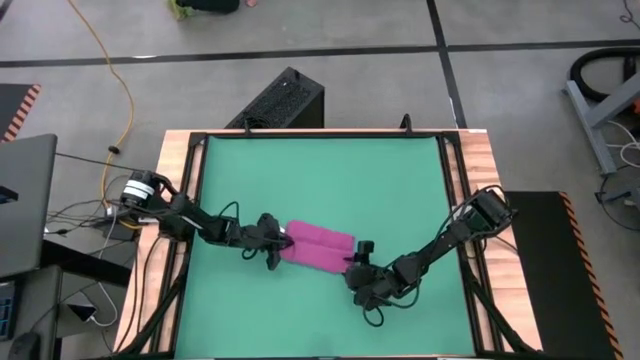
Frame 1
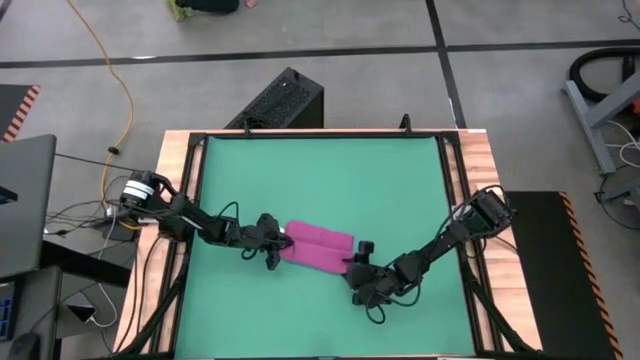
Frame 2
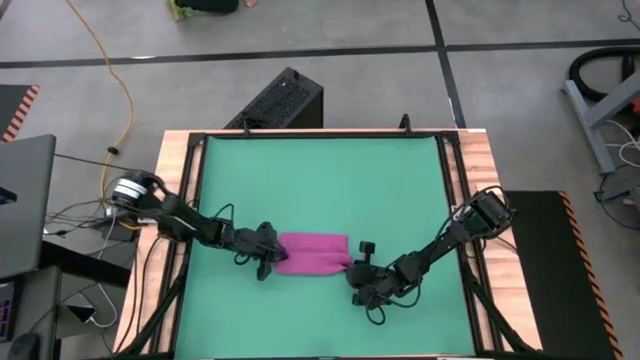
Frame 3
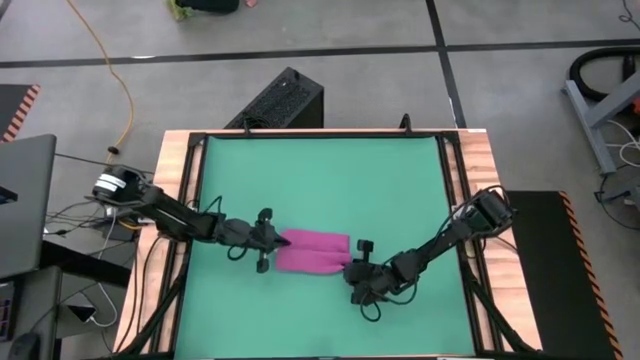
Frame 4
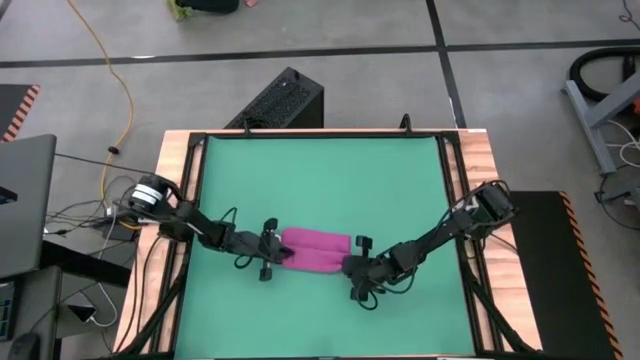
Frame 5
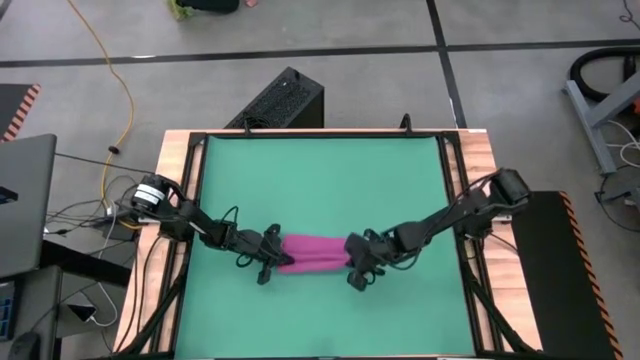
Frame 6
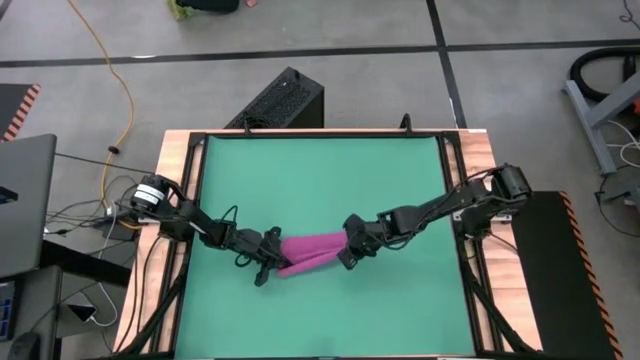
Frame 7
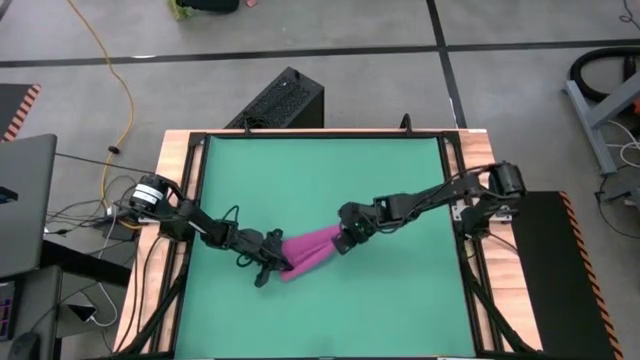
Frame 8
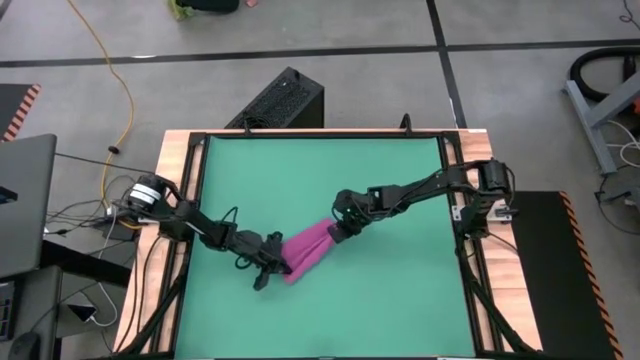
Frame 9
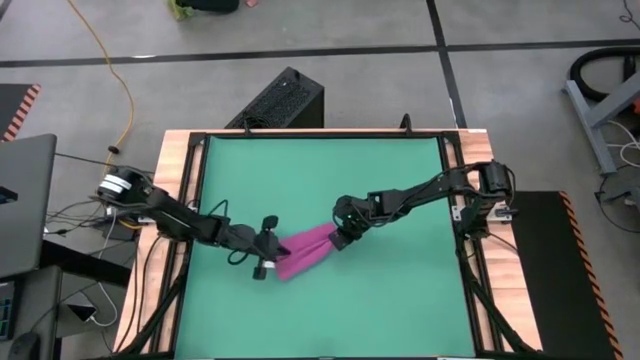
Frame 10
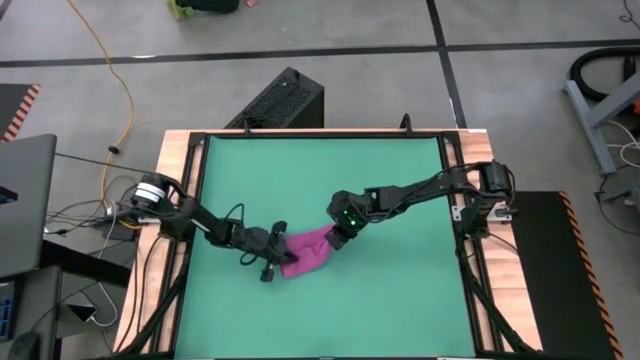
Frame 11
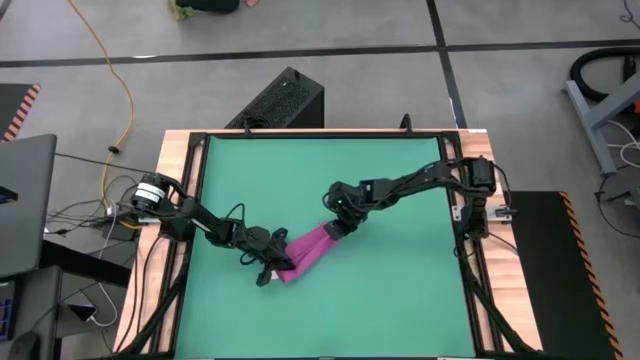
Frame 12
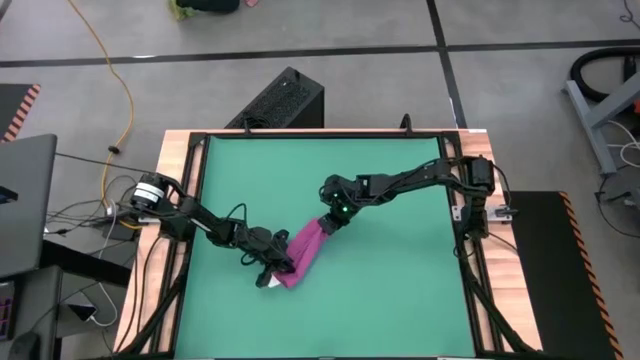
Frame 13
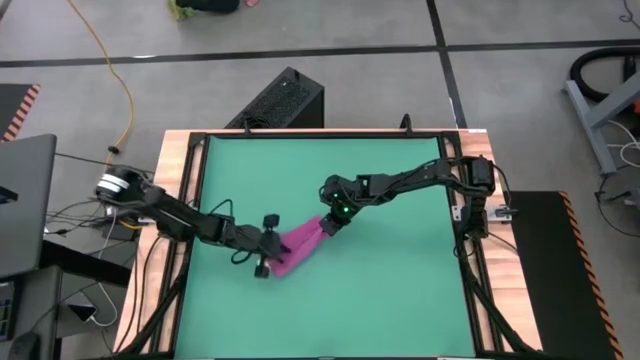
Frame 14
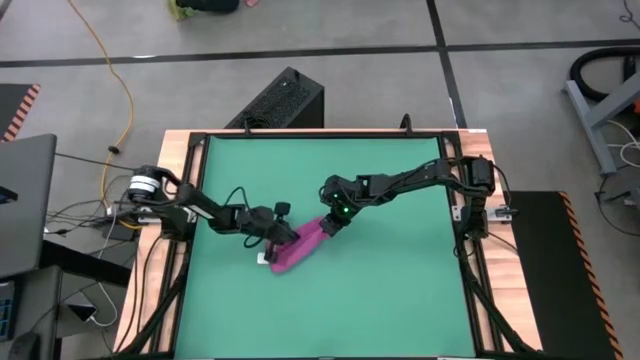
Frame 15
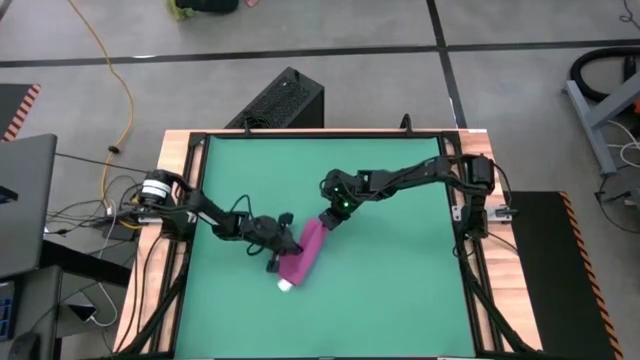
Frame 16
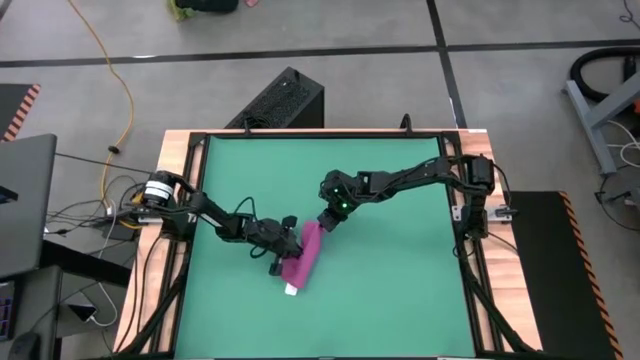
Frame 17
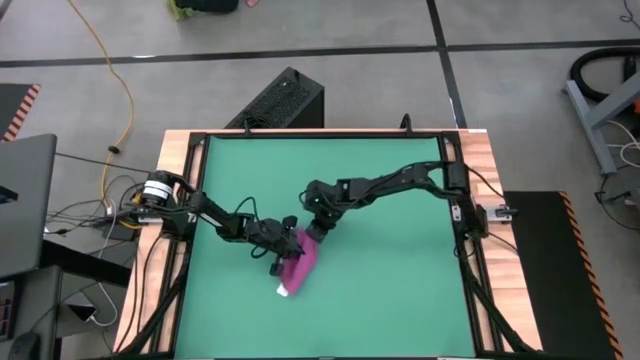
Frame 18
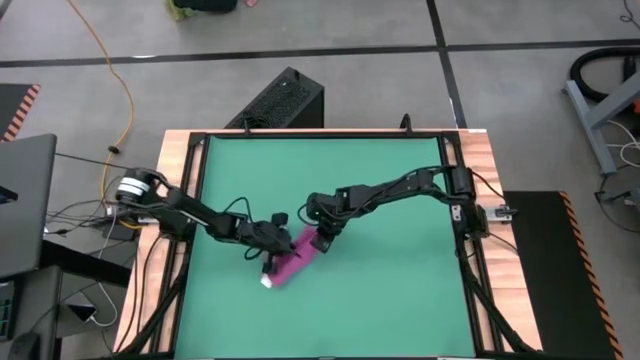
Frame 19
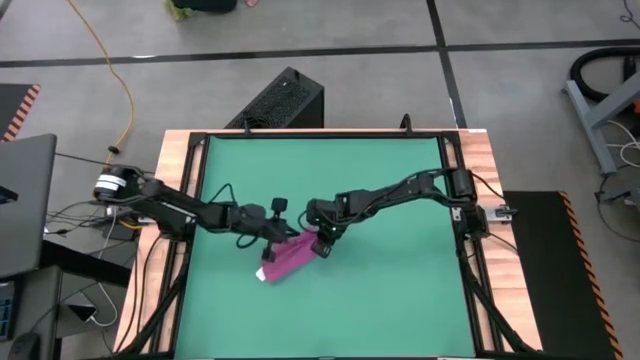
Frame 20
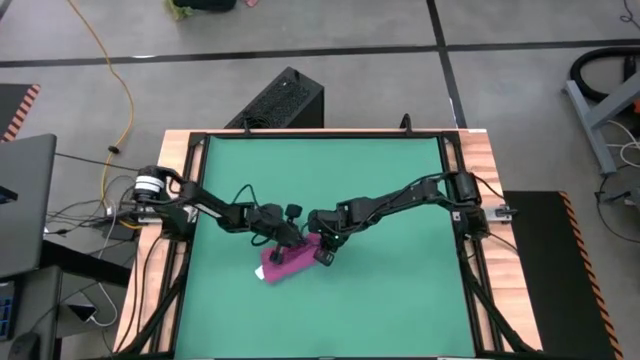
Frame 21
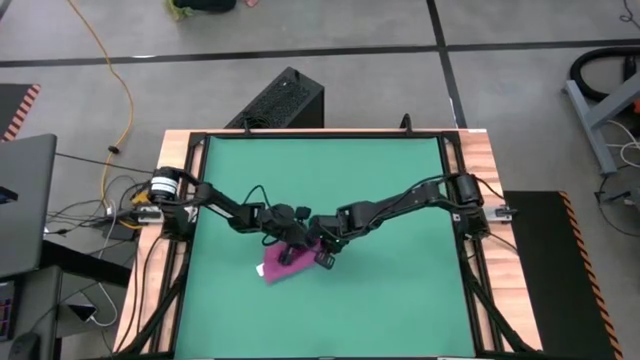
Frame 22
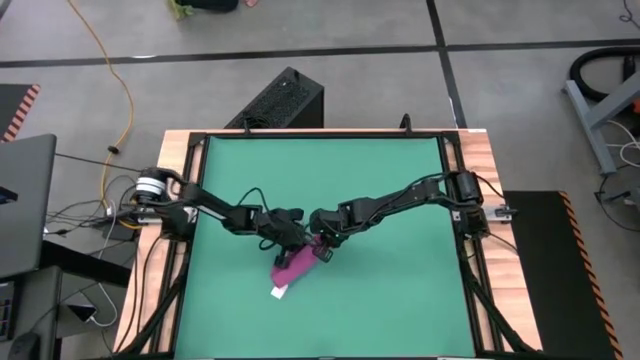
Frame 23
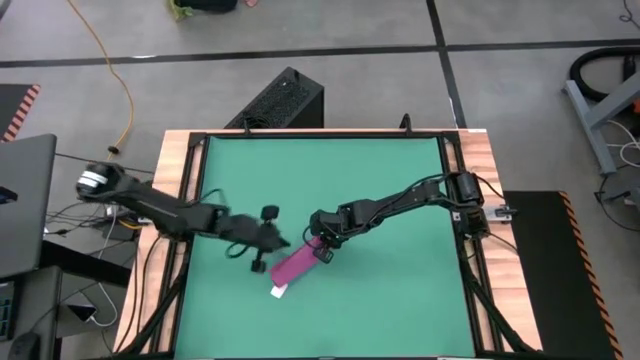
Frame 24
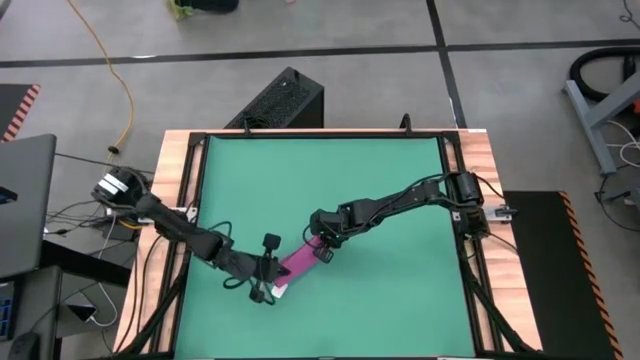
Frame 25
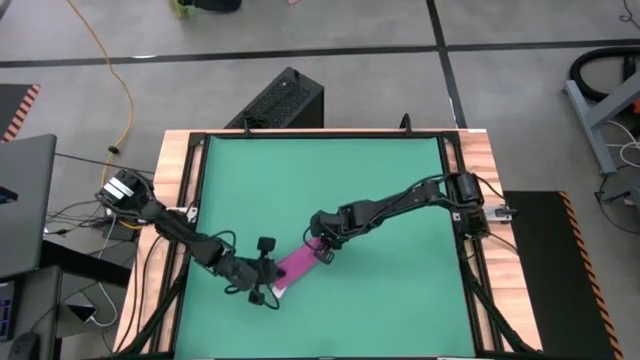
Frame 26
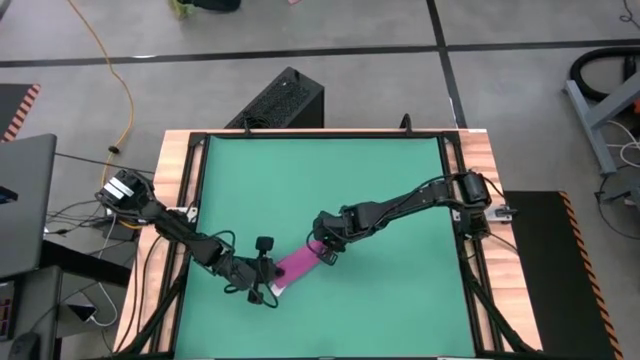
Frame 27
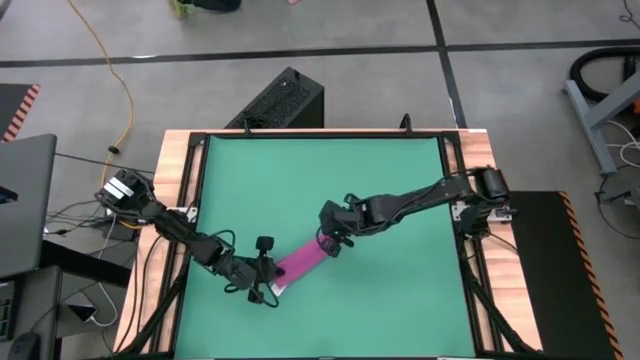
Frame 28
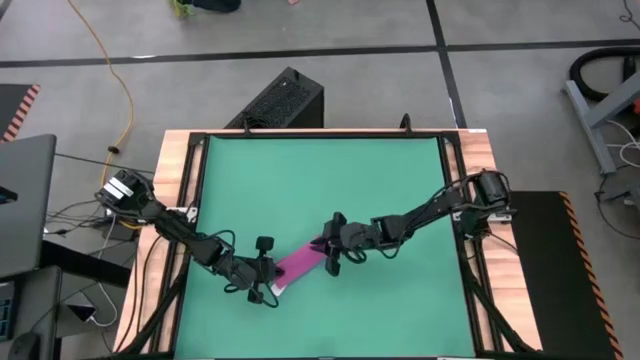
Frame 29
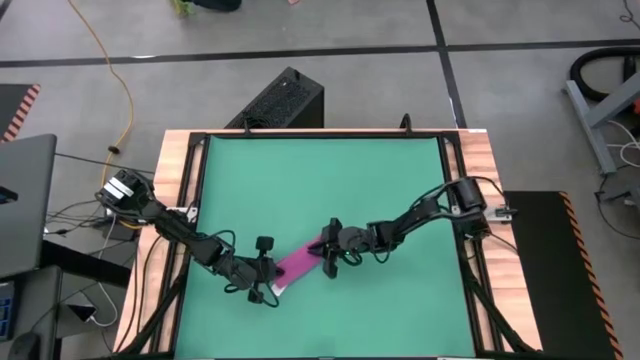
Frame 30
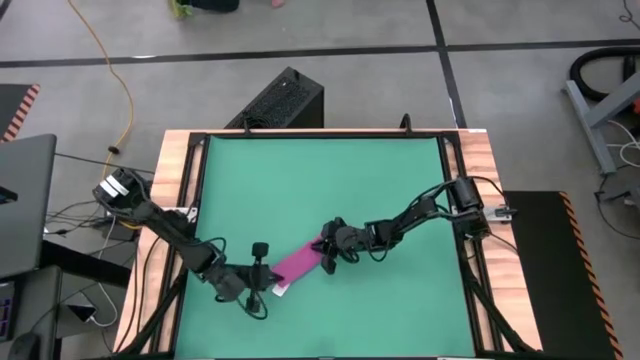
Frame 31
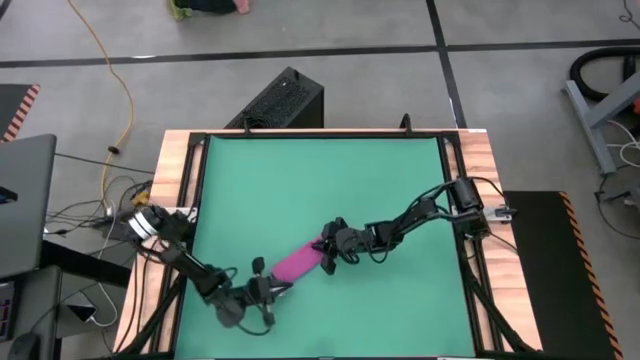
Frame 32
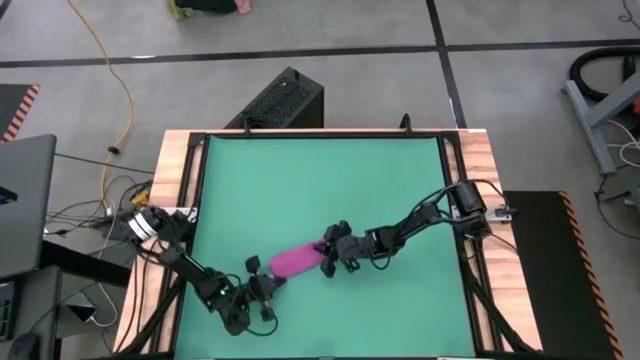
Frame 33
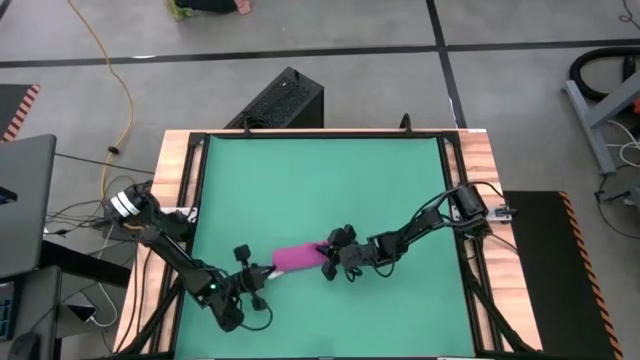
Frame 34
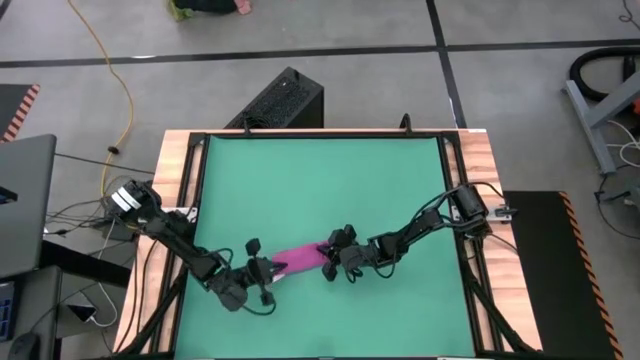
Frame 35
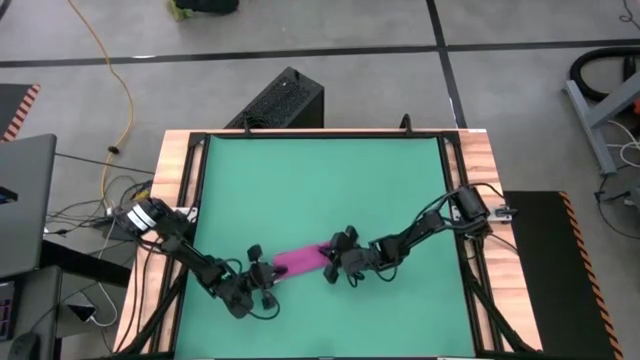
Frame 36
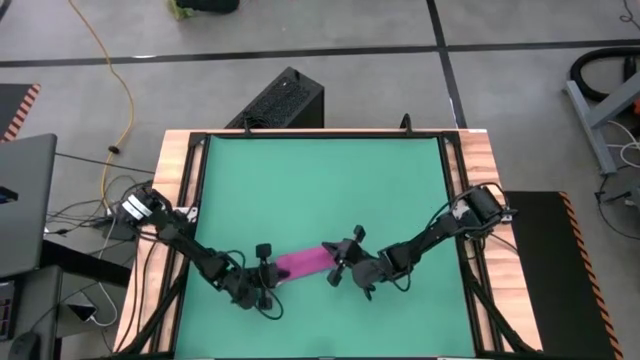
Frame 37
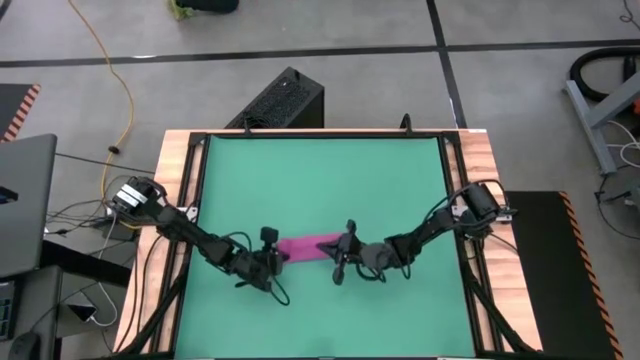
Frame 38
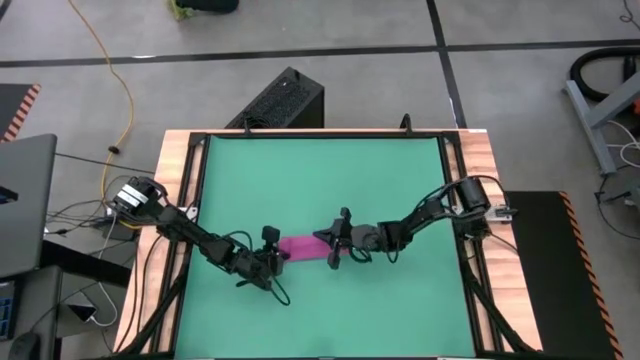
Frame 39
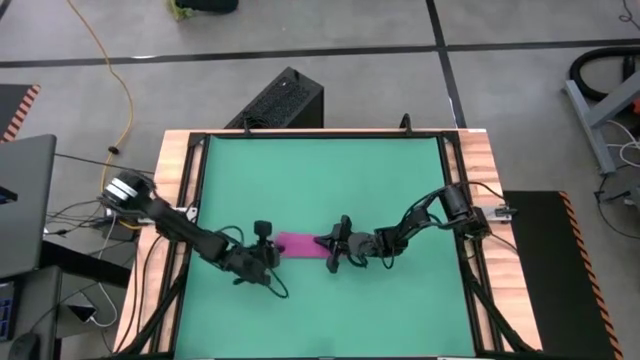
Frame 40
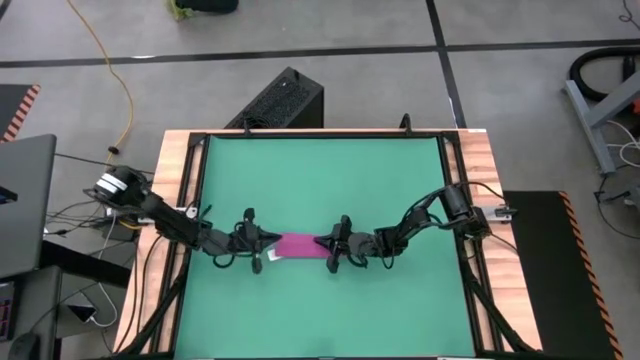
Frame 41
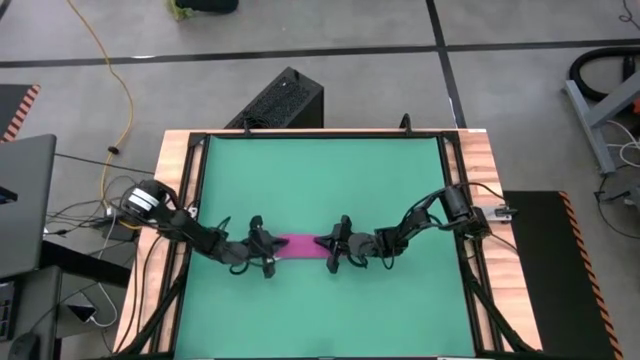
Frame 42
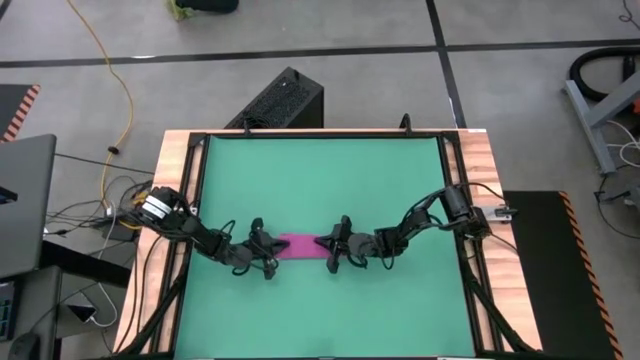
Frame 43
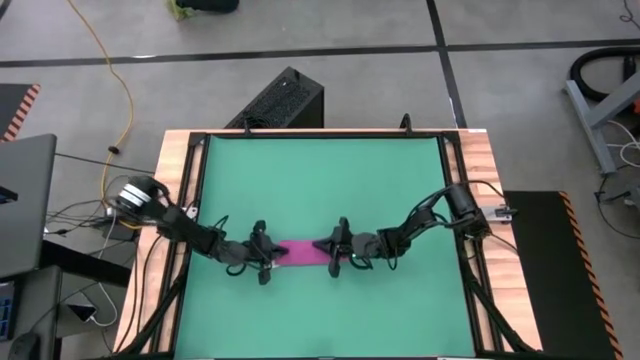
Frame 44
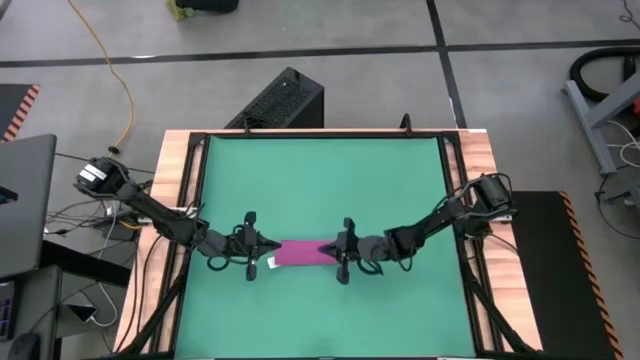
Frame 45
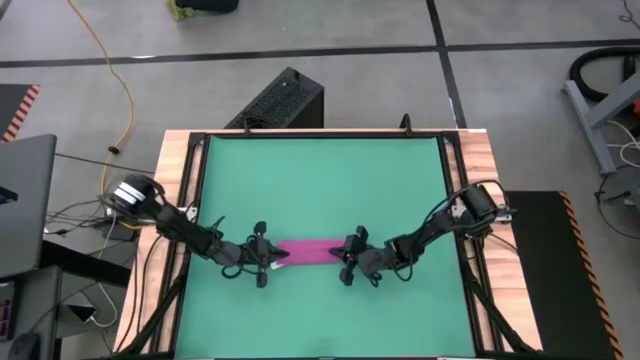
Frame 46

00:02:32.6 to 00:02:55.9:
Task: Roll towel into tight, uniform cylinder
Roll the pink towel
